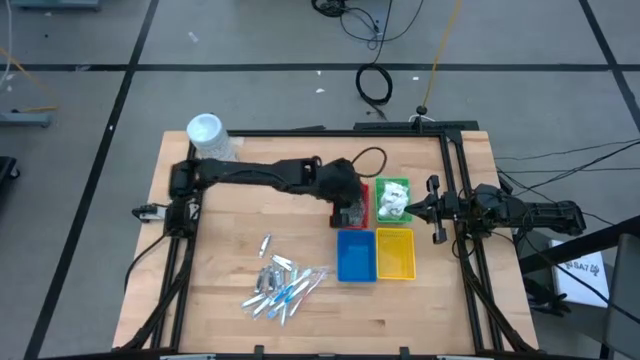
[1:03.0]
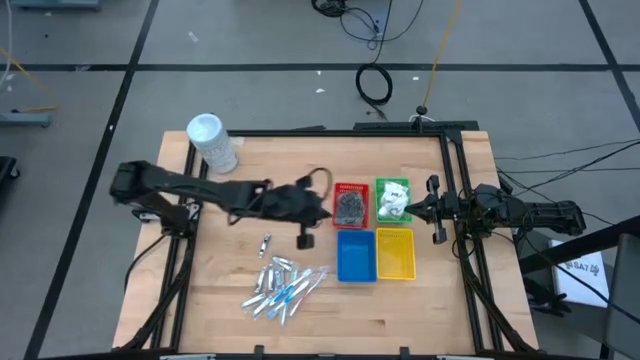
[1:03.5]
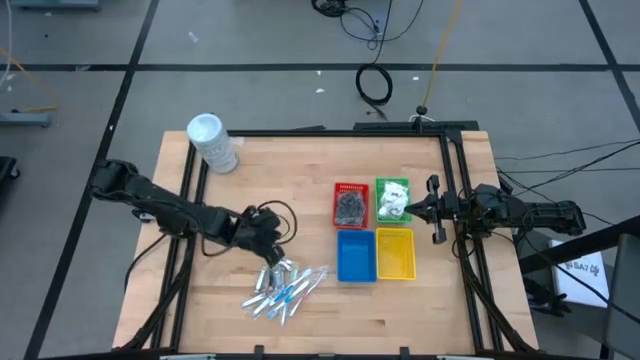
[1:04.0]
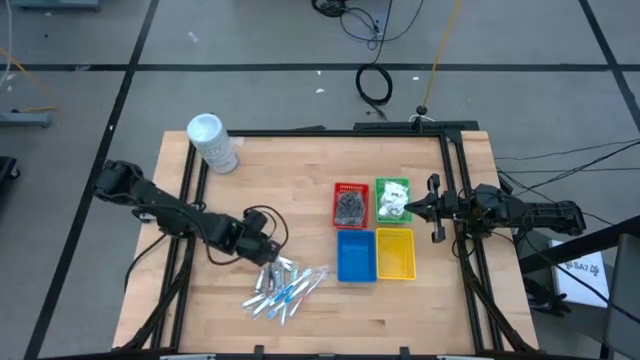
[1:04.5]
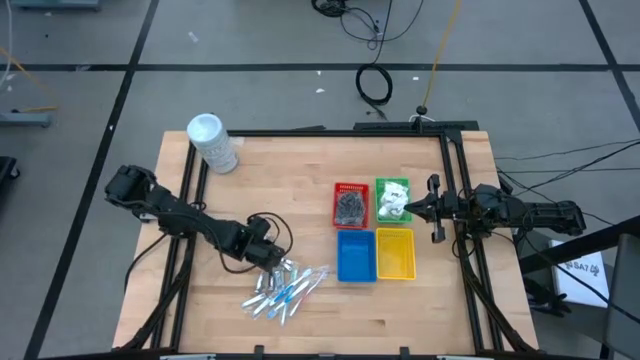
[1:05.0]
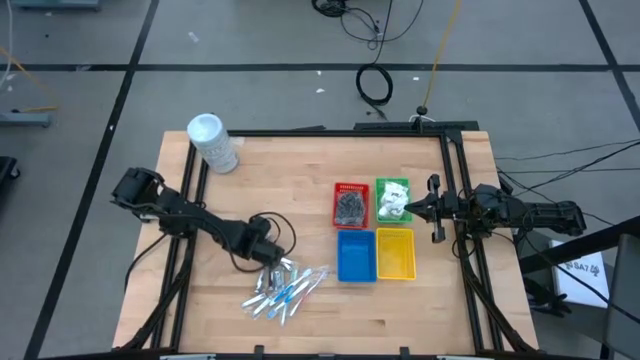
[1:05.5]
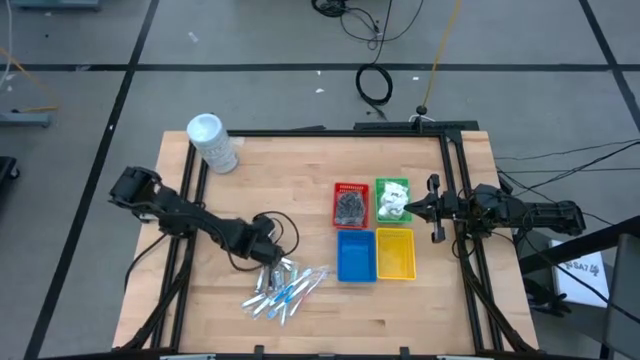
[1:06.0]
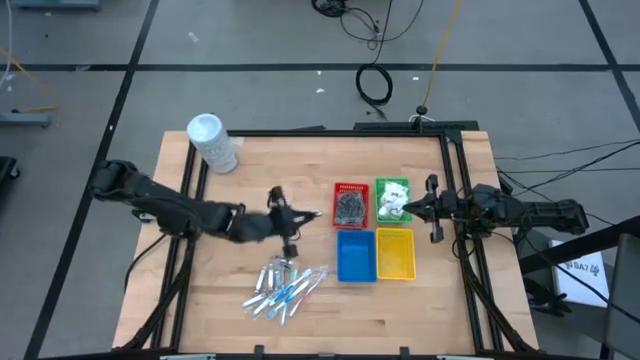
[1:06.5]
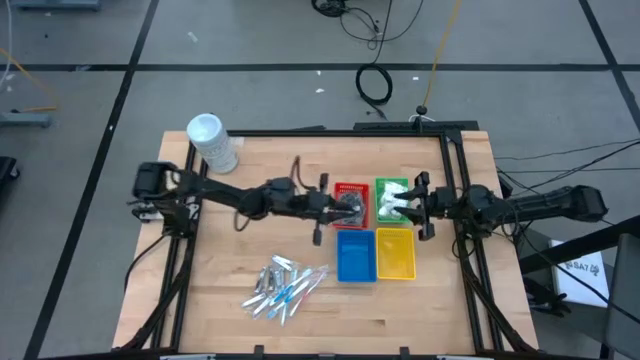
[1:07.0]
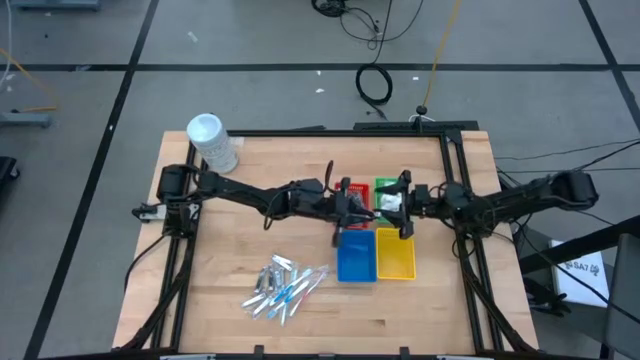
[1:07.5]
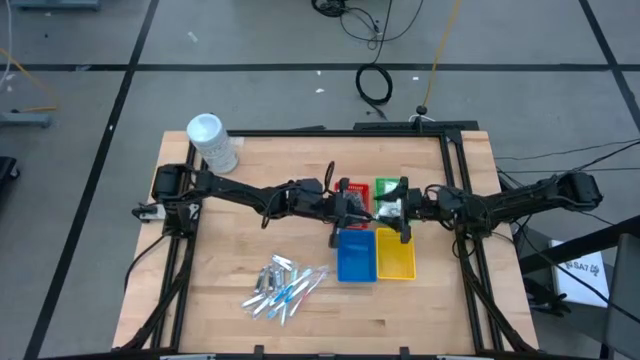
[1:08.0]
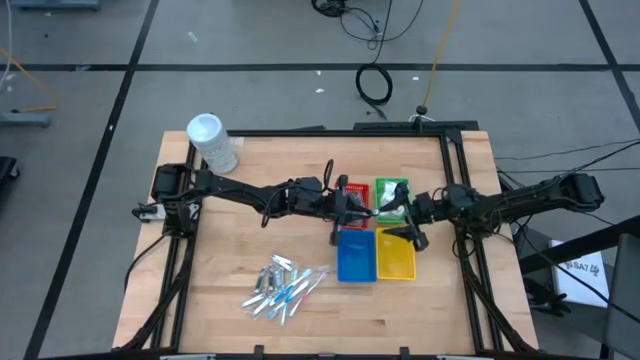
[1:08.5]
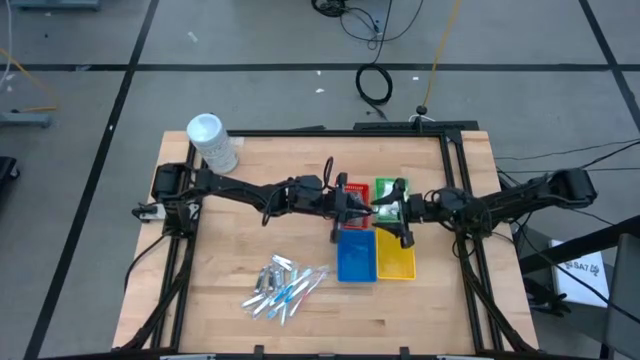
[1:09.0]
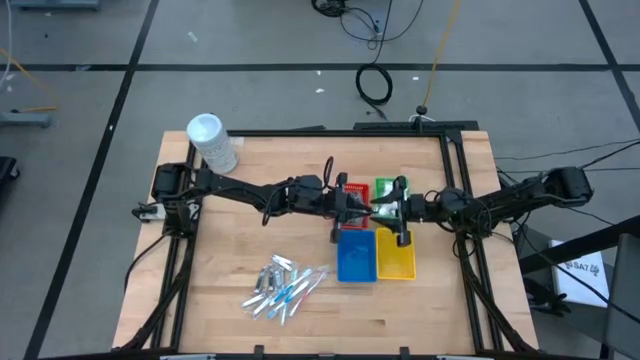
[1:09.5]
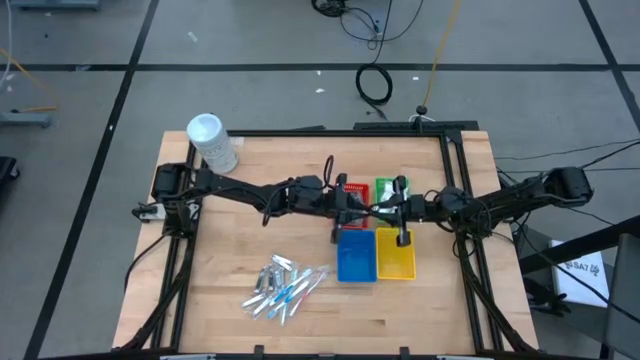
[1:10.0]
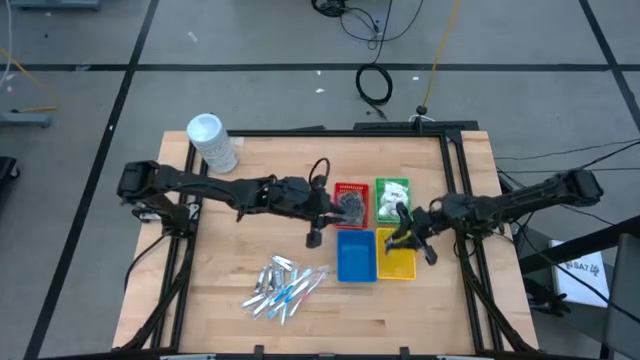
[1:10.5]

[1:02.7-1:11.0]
Task: Pick & Place Travel size toiletries
Put the silver nail cutter into the yellow bin

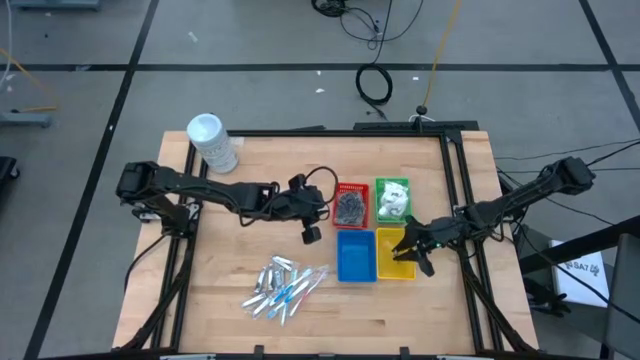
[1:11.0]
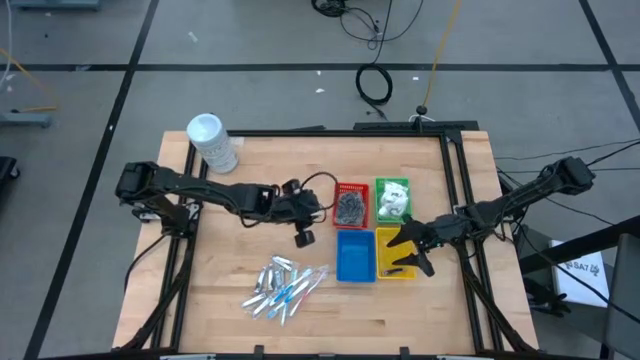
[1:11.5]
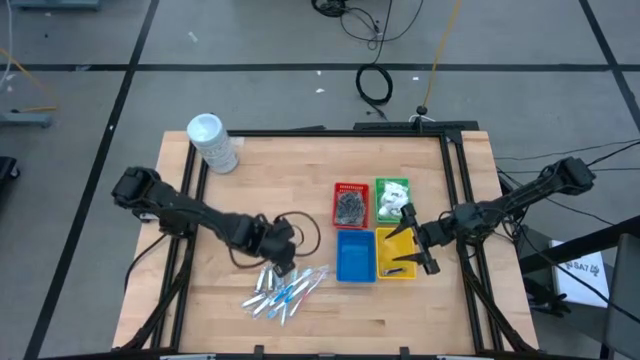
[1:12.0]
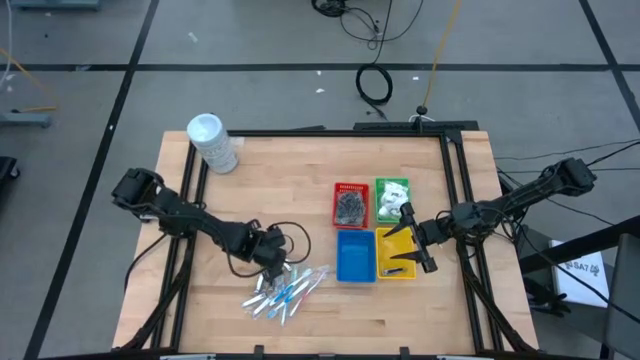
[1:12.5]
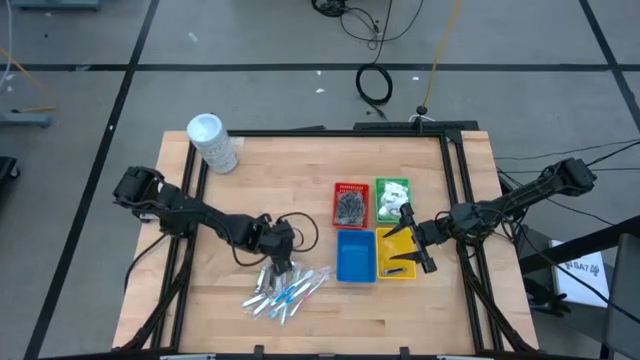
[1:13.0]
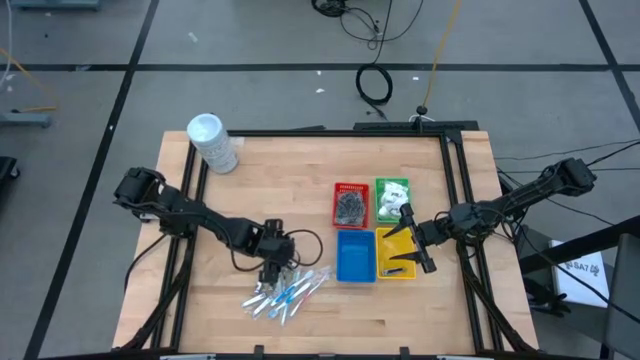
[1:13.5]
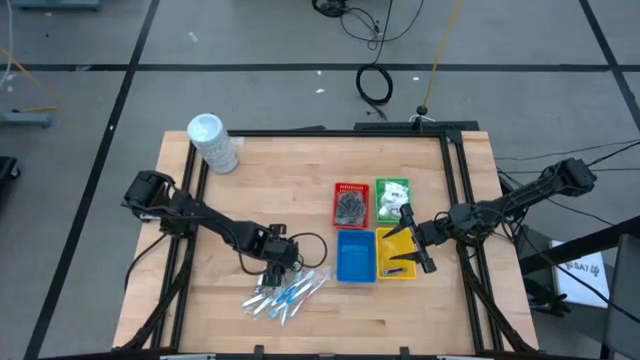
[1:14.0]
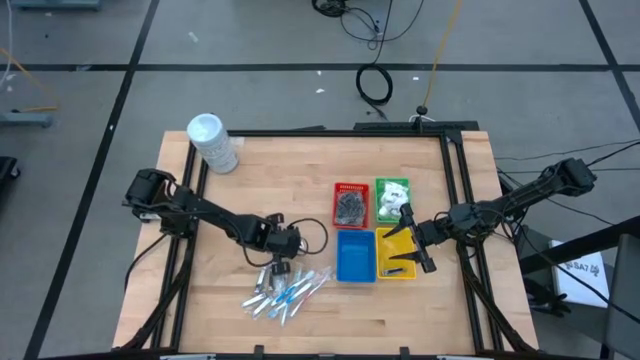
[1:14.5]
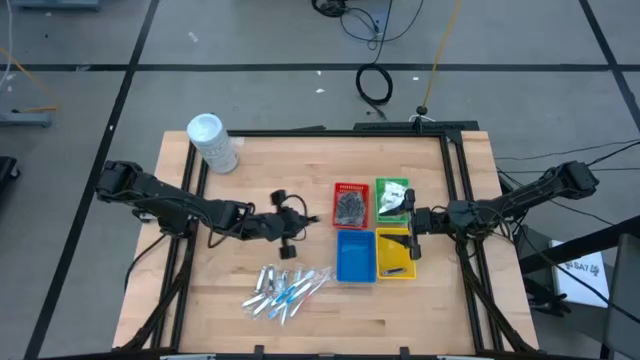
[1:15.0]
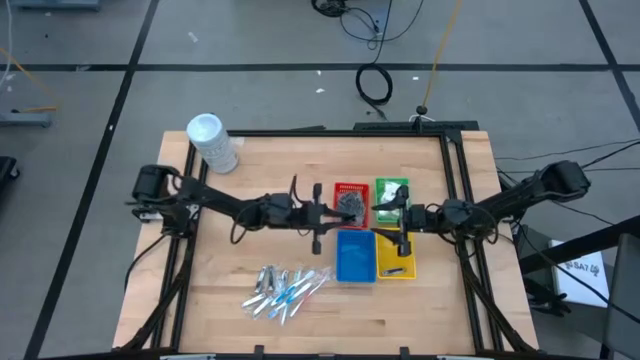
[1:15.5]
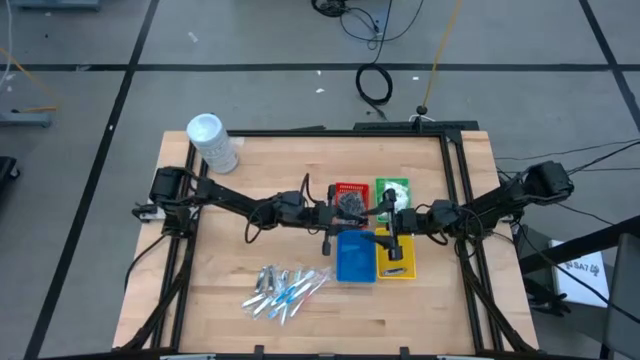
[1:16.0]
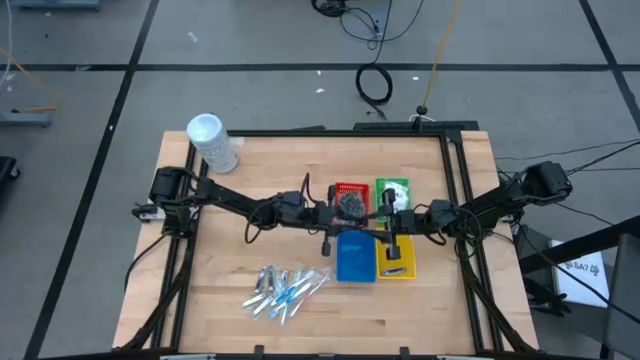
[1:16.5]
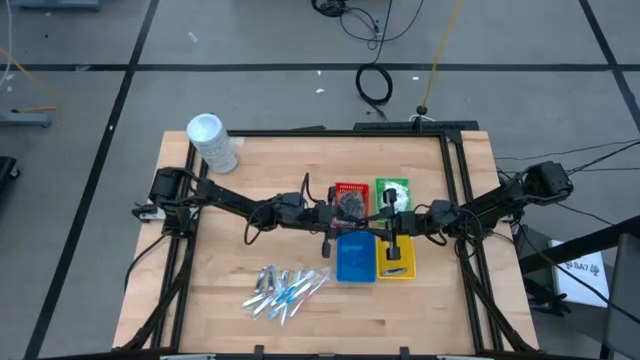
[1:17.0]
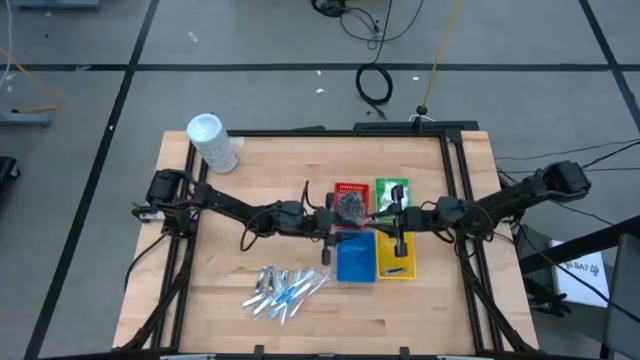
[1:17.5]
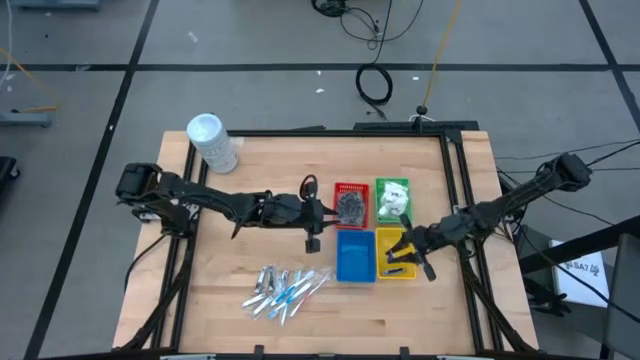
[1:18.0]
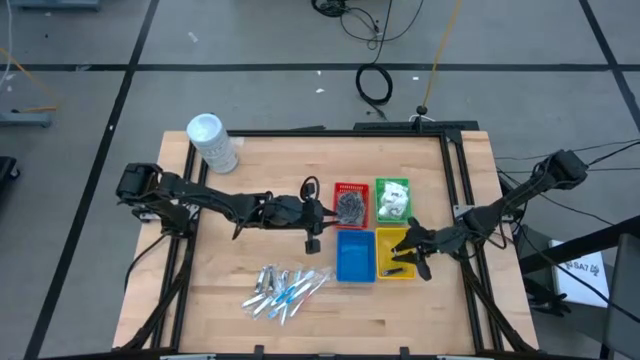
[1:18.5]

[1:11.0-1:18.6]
Put the silver nail cutter into the yellow bin

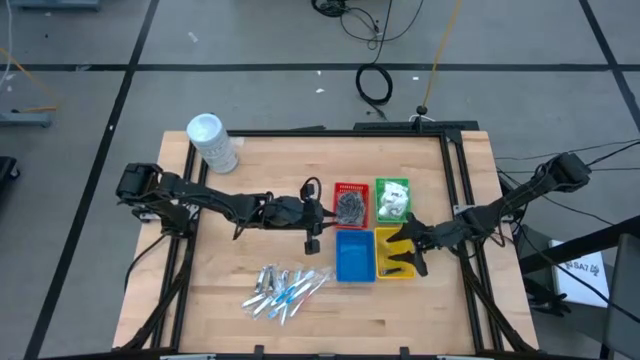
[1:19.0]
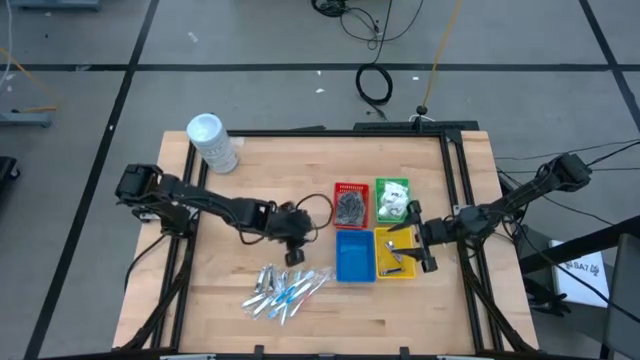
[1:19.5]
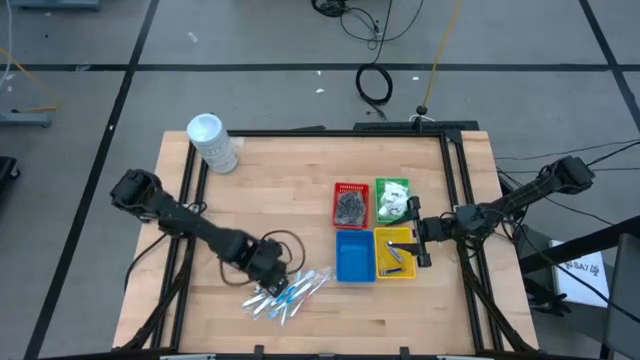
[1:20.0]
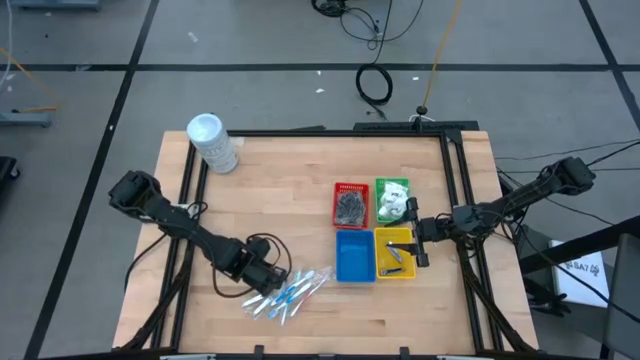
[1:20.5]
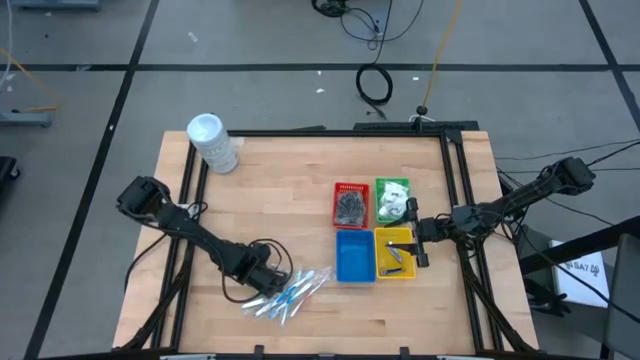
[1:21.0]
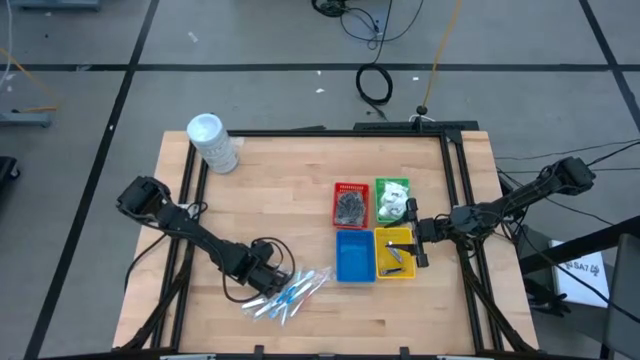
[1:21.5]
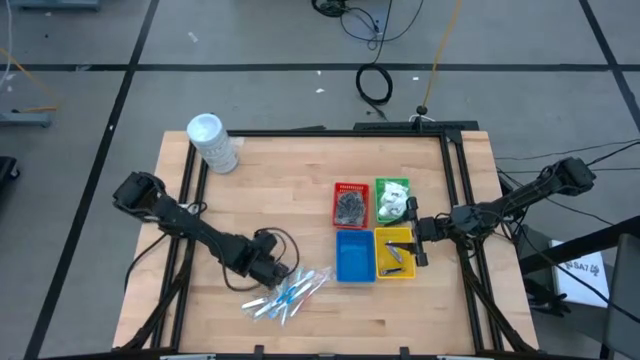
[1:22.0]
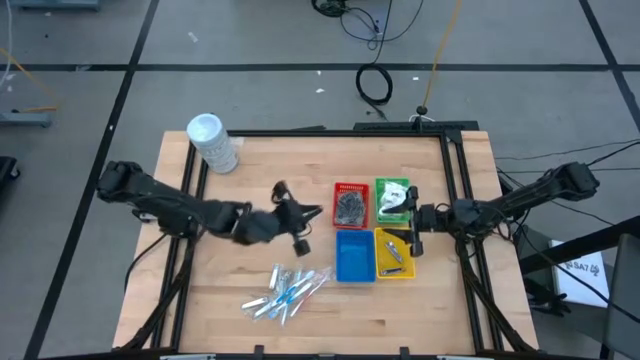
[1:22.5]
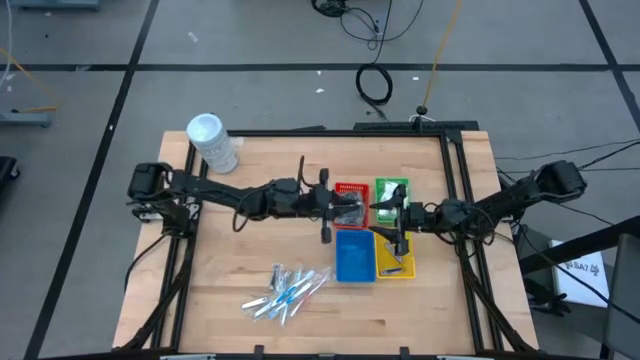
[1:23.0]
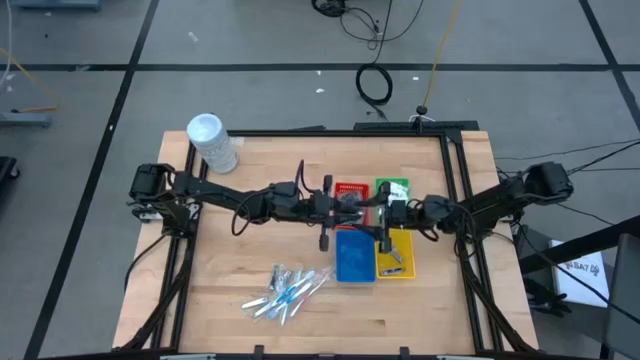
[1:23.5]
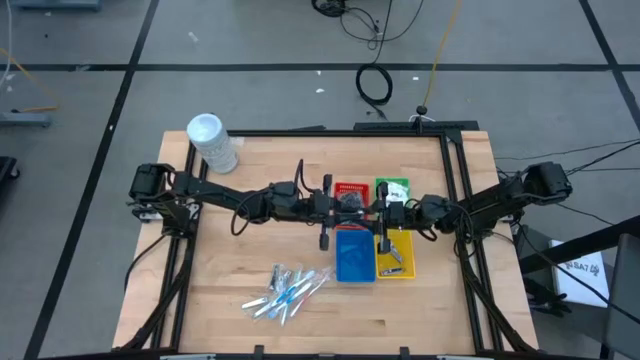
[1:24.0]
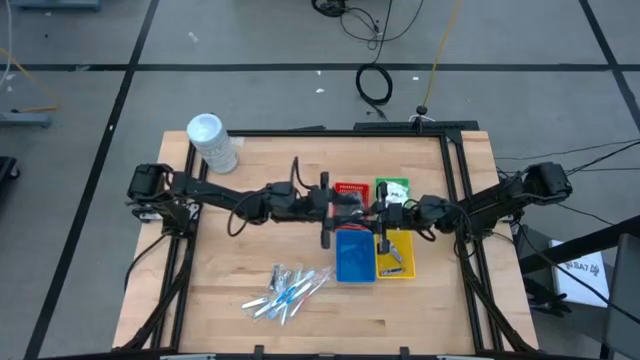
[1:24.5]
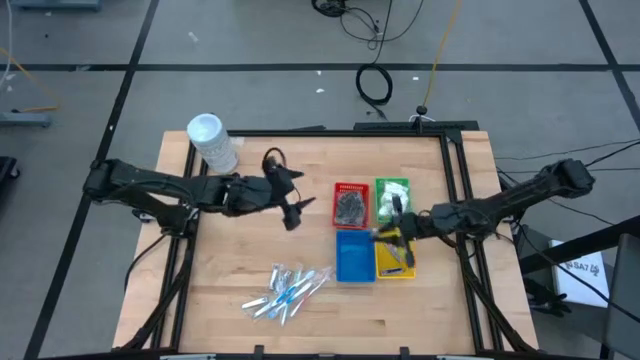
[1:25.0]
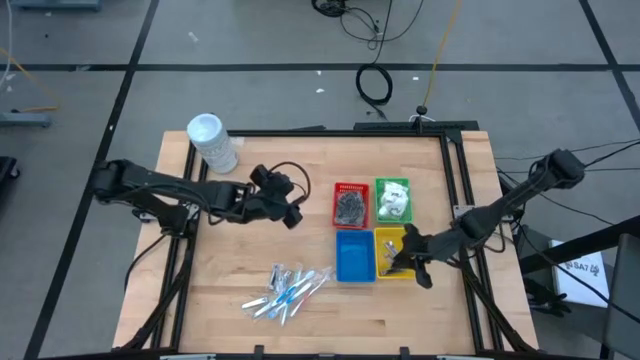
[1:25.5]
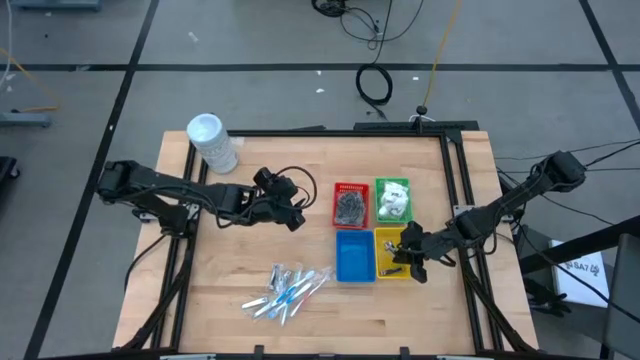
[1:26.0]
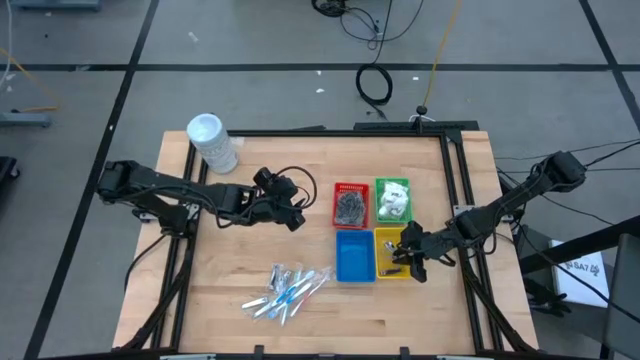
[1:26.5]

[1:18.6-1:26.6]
Put the silver nail cutter into the yellow bin
